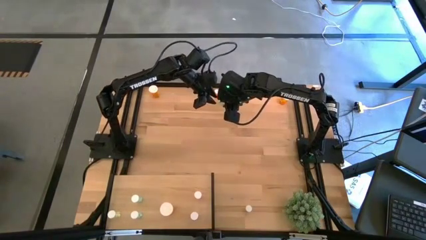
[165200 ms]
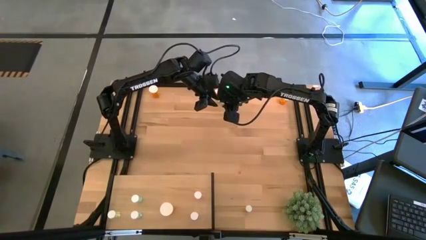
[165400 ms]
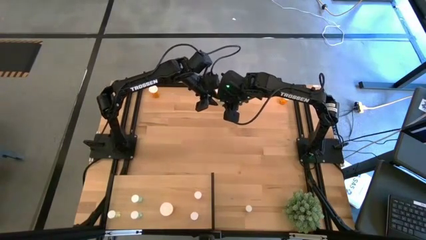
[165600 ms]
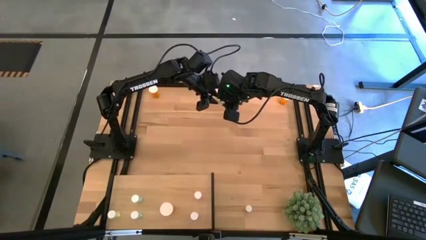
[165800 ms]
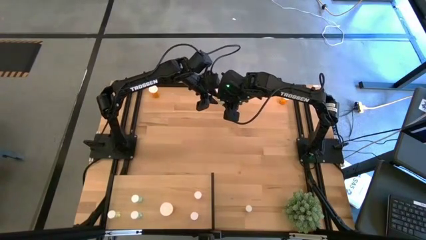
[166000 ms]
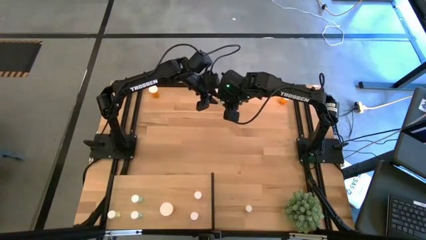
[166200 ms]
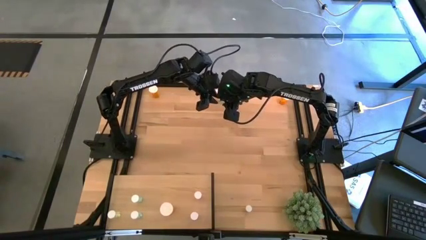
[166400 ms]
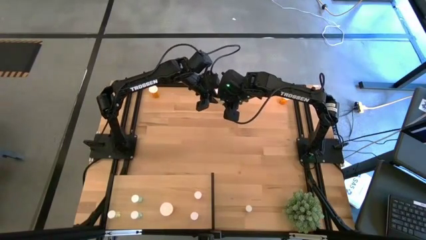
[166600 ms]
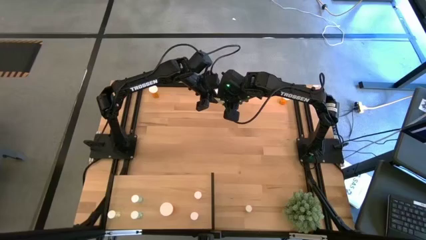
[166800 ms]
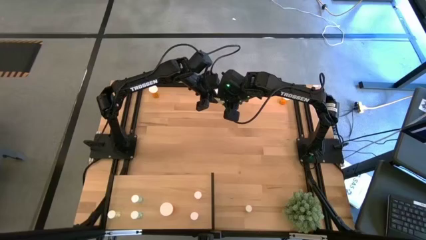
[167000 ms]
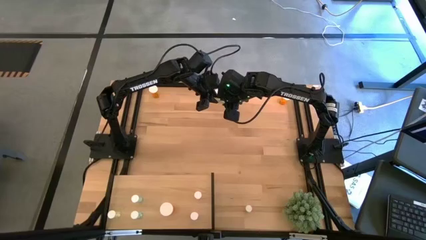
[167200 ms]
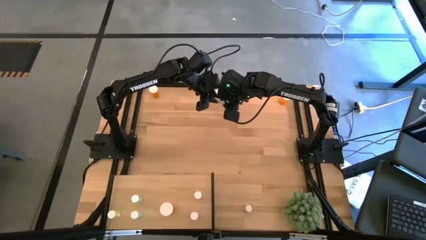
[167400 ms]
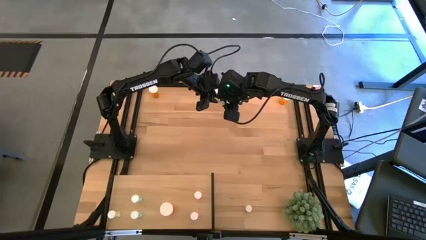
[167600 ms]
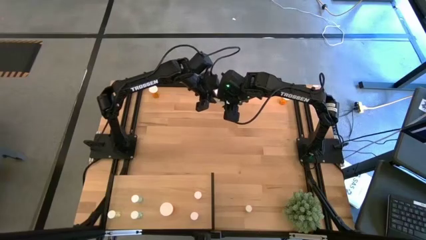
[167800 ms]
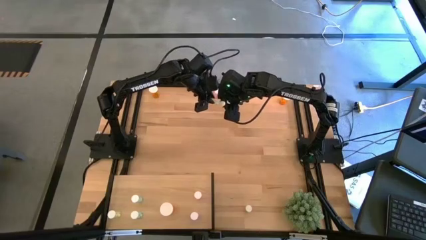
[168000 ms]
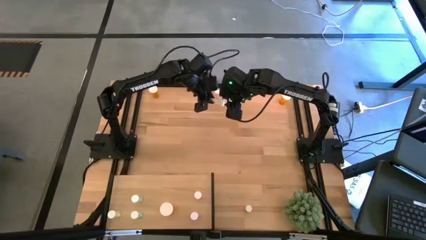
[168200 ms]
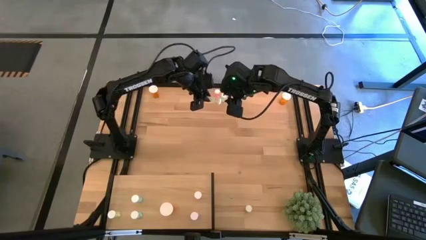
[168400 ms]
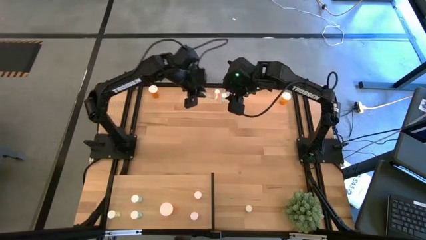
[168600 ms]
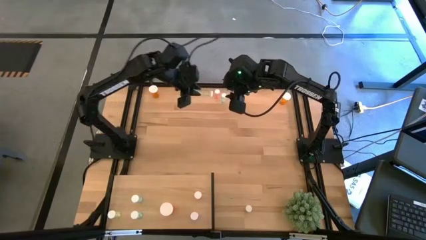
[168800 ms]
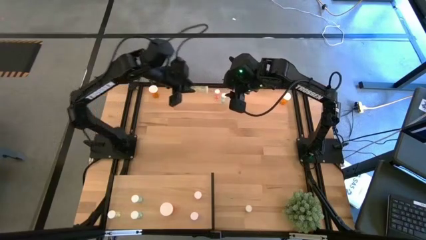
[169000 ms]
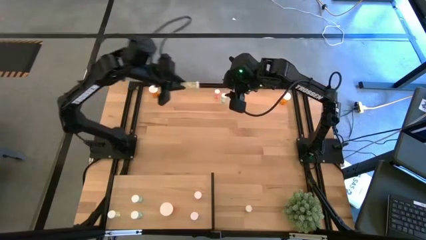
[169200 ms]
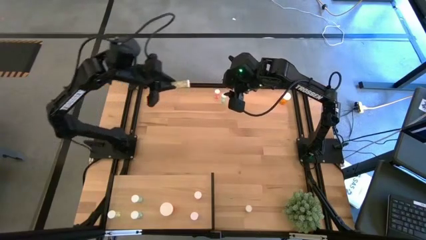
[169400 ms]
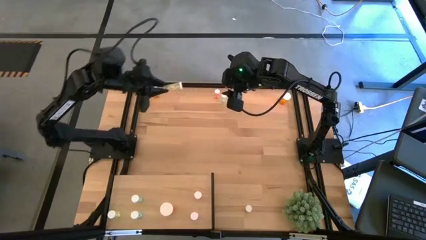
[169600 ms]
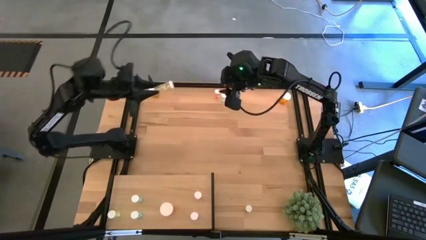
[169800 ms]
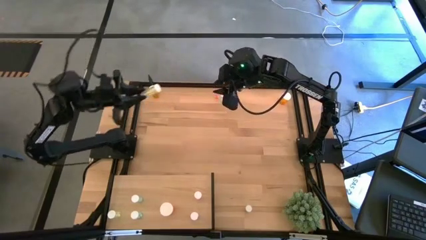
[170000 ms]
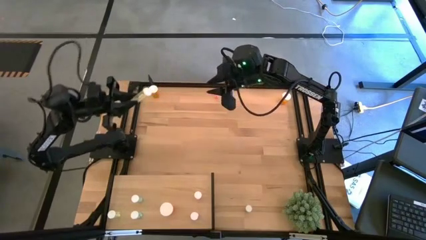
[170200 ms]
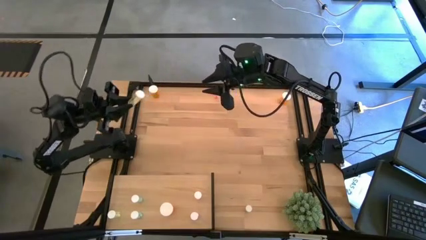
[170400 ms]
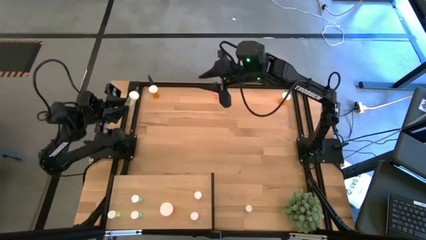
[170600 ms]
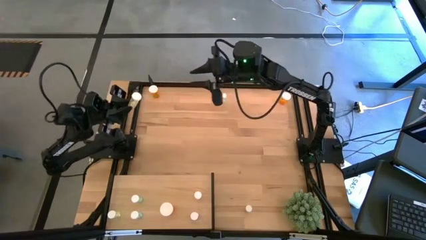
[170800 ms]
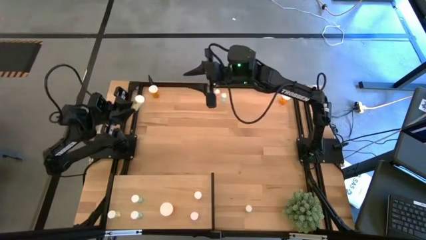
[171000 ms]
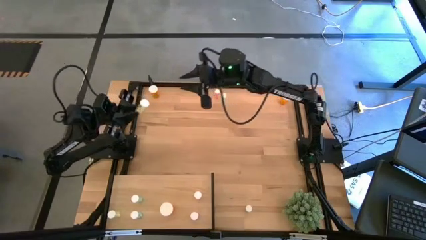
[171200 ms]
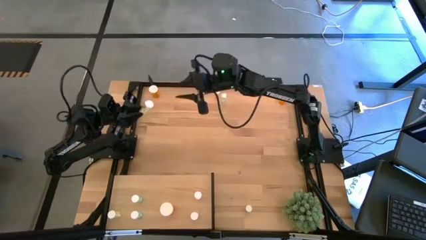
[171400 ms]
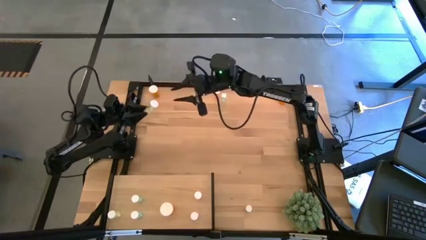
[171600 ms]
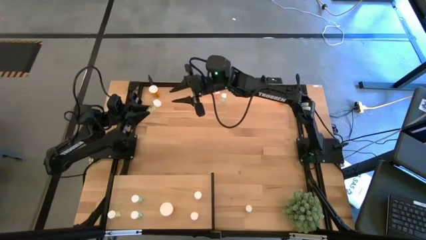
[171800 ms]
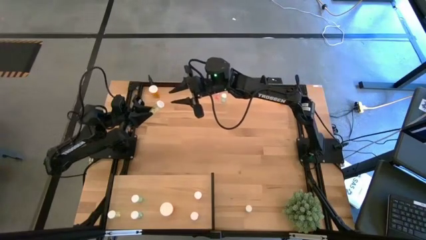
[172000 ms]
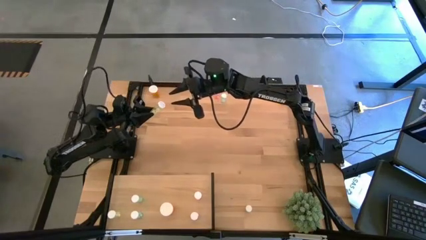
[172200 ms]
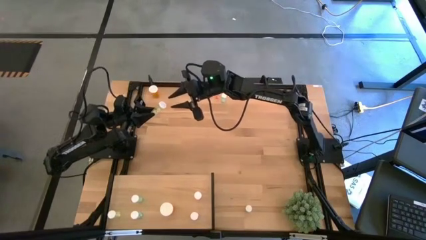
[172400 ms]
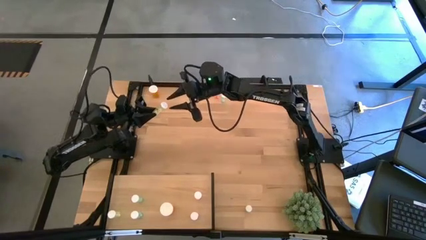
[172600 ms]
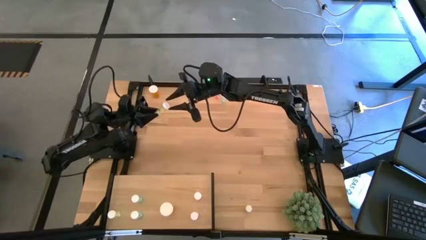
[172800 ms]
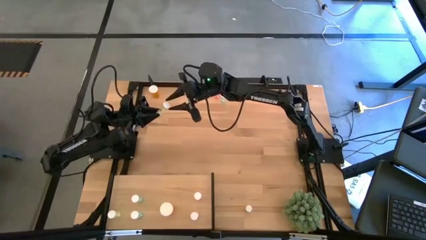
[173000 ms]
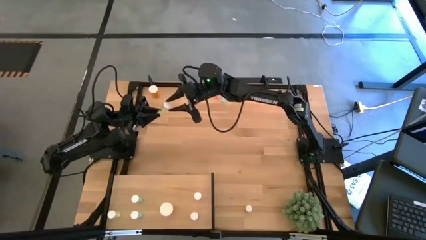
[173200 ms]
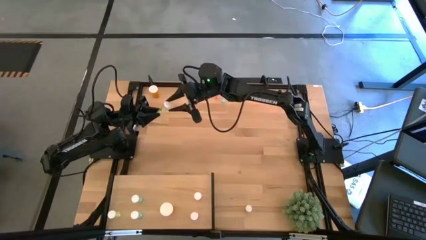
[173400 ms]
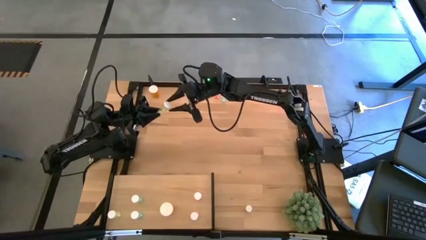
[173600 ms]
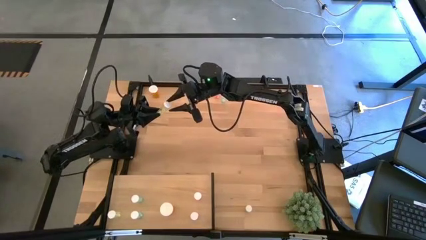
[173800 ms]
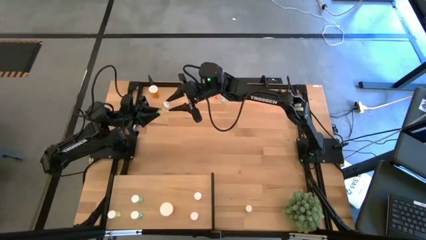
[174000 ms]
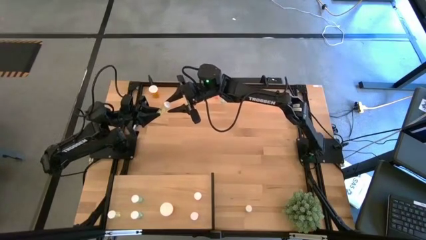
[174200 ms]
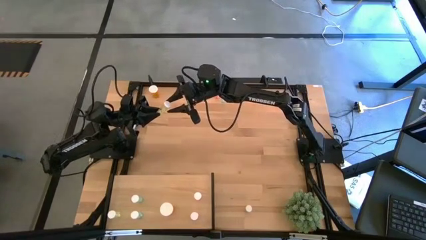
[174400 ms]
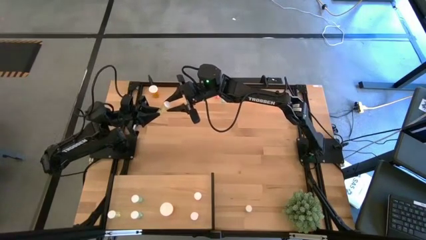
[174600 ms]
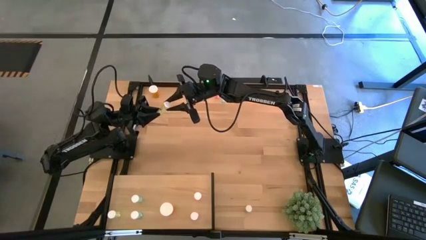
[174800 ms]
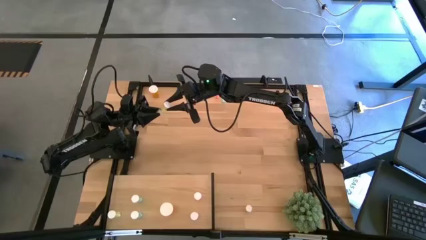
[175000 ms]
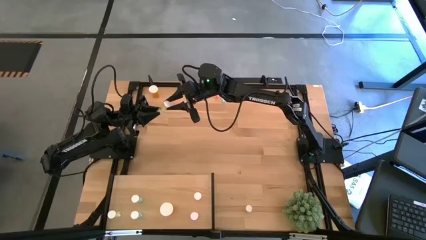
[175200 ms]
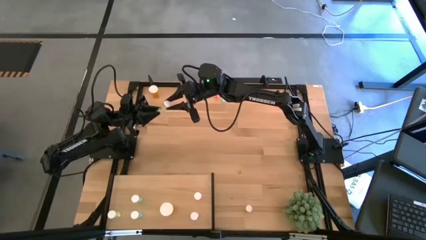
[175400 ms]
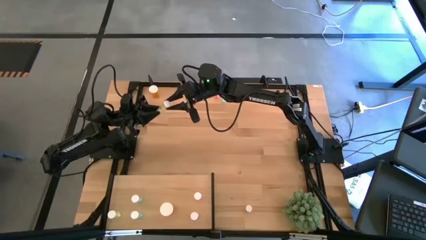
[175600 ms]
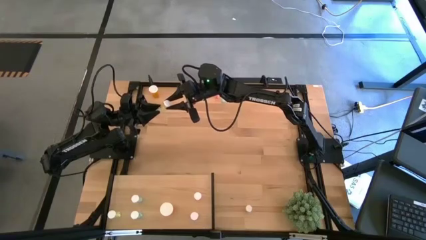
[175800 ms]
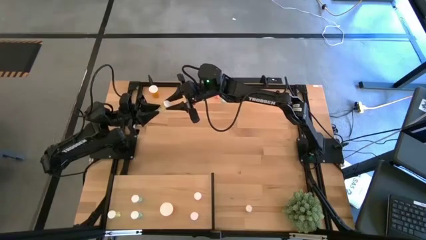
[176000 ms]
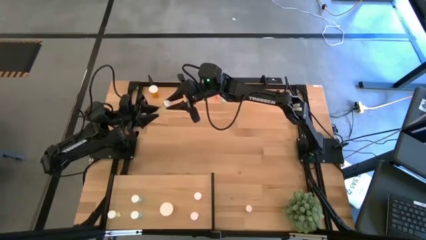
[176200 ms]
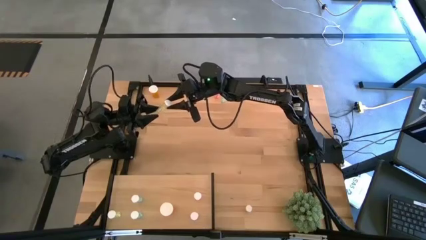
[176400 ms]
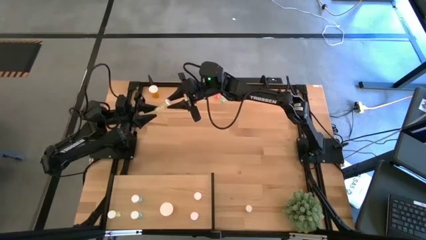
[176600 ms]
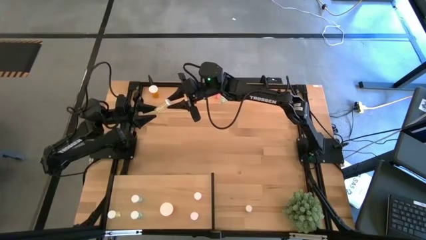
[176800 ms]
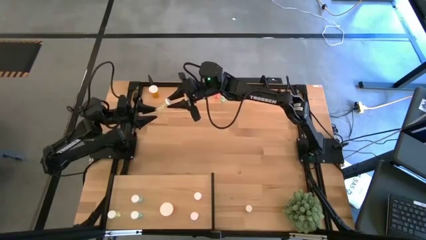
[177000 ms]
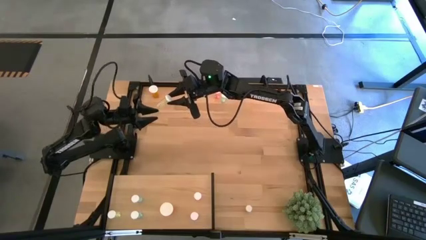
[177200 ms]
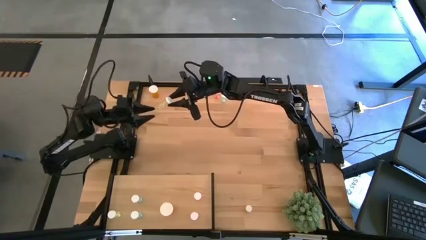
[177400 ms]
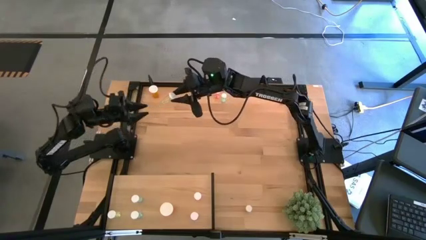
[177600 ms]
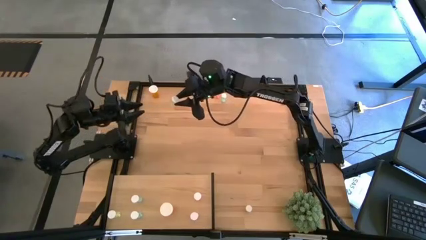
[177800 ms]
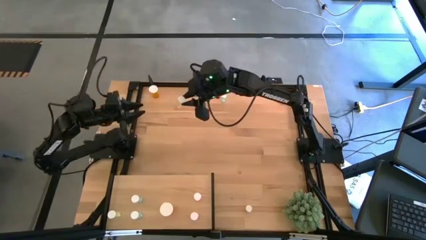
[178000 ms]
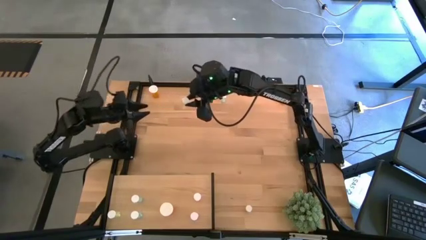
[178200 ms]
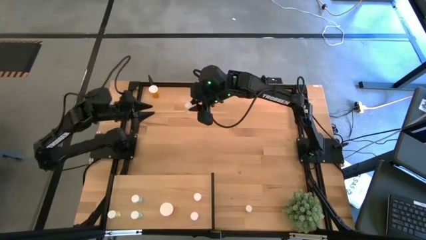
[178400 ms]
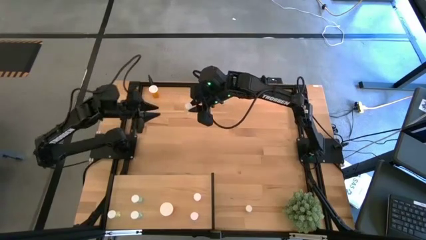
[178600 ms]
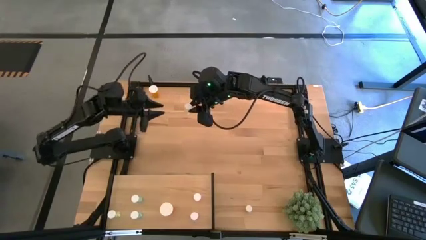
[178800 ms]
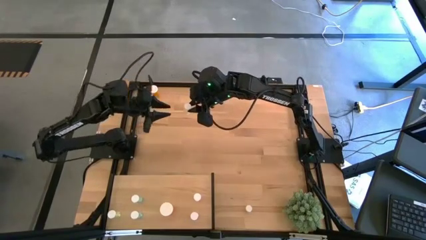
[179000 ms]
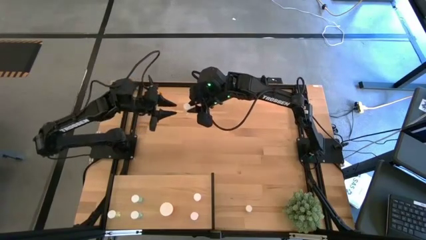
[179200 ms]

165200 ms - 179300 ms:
Task: Pick and place medicine bottles onto shelf by color
Put the top right yellow pill bottle on the shelf aligned with the other yellow pill bottle

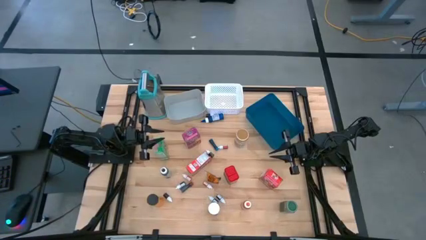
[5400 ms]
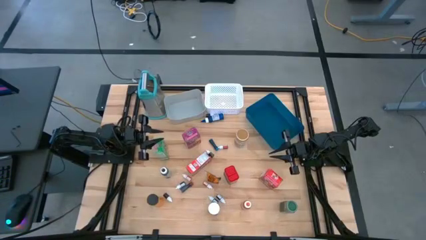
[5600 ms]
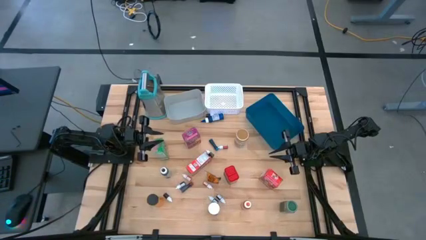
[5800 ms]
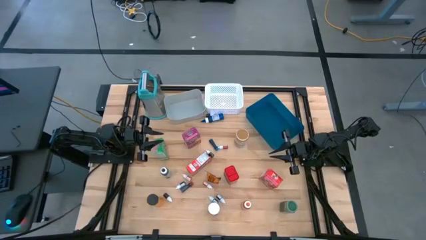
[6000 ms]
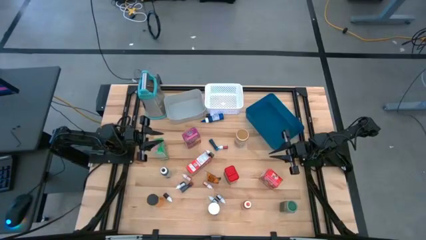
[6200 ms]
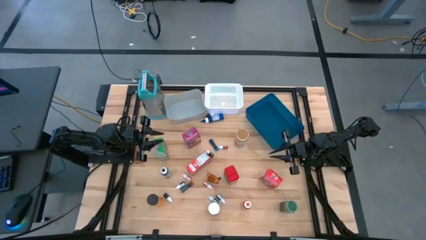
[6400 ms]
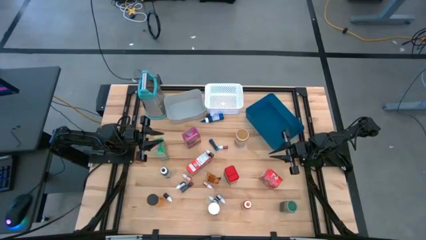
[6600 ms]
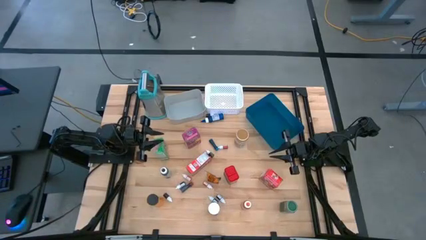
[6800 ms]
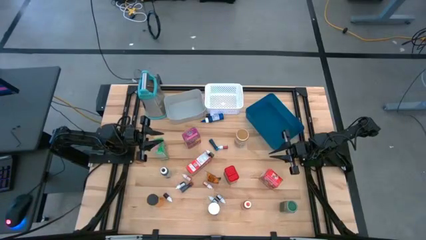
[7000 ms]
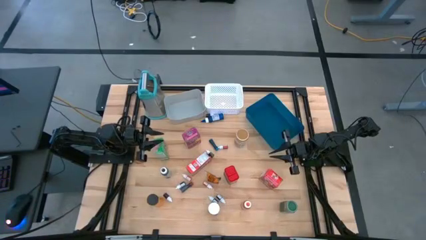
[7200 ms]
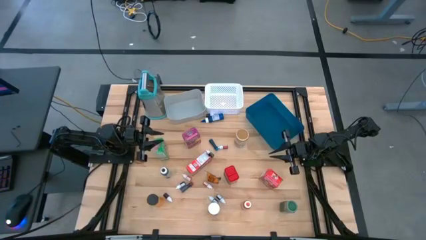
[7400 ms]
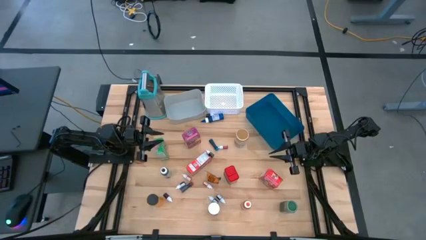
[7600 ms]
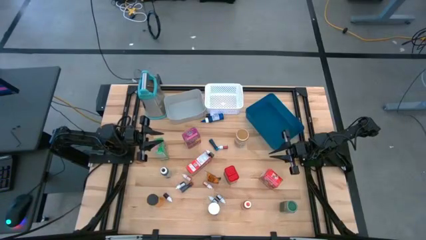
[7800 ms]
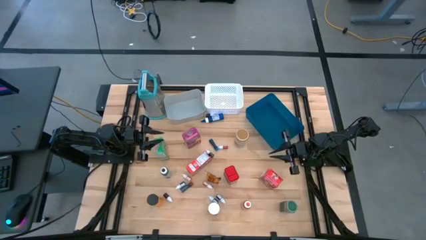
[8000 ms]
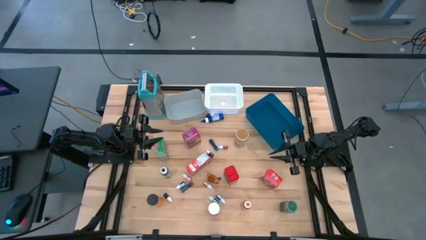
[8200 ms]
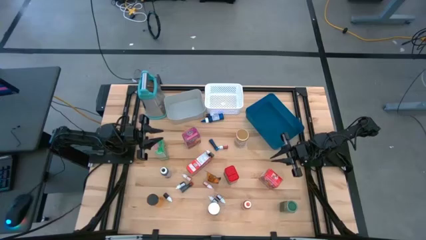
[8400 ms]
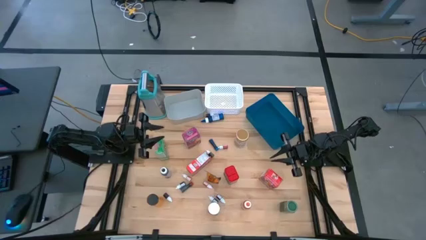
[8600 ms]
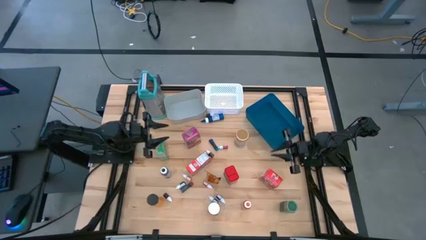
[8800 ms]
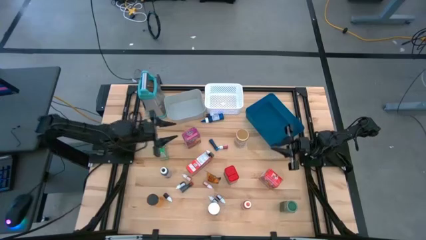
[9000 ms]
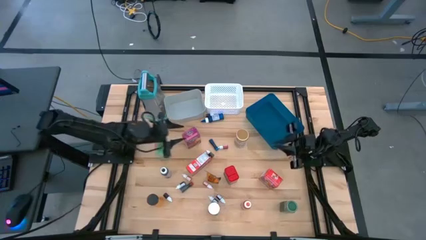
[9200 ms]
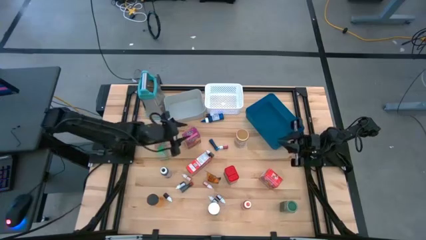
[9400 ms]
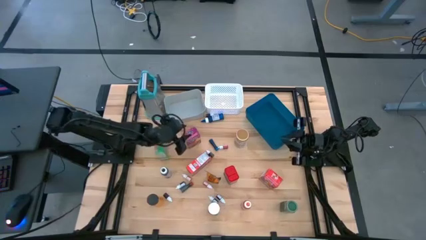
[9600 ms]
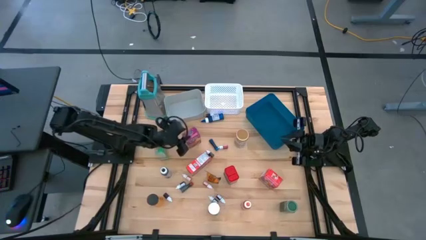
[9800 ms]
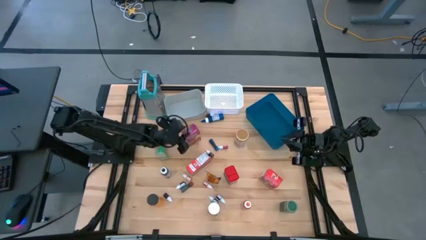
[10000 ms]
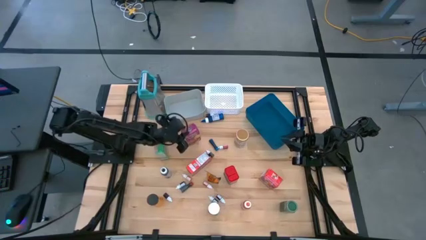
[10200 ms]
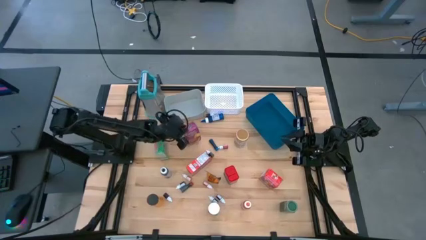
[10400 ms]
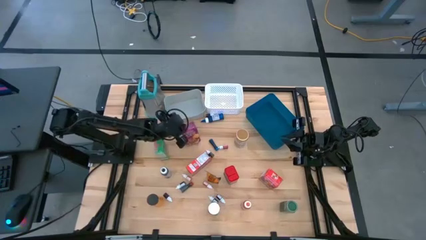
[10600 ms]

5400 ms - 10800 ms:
Task: Pick & Place Kitchen Items
Put the pink cereal box into the gray bin
